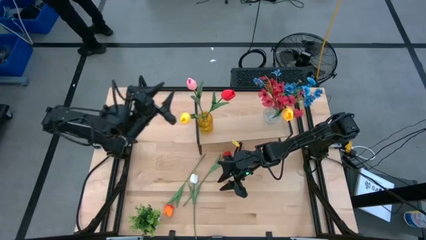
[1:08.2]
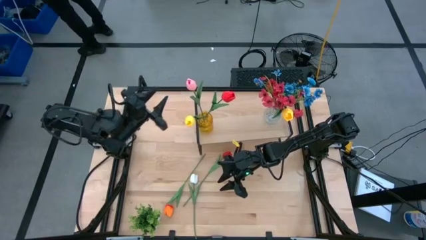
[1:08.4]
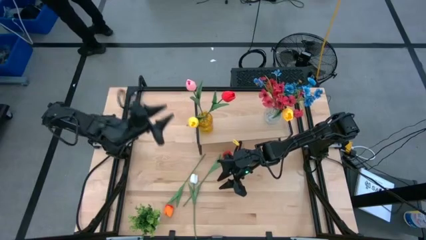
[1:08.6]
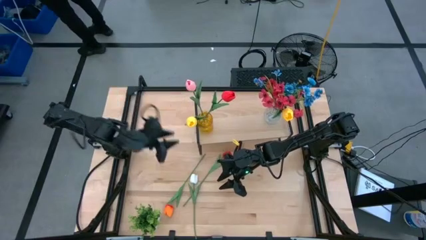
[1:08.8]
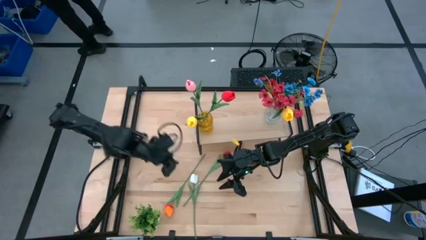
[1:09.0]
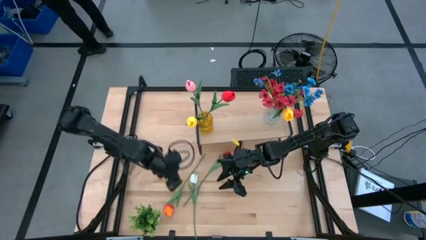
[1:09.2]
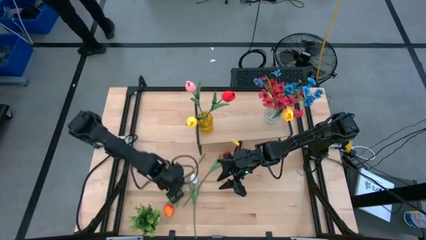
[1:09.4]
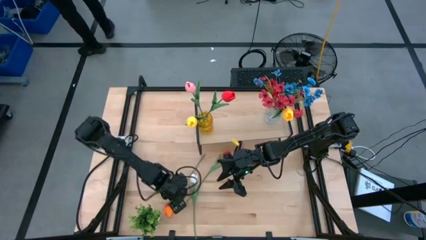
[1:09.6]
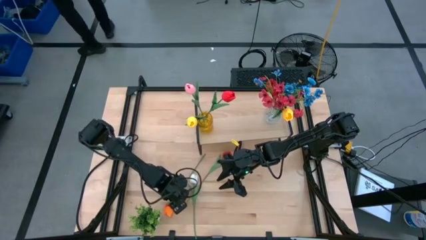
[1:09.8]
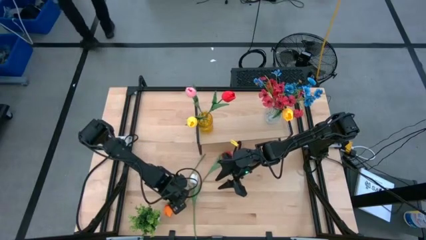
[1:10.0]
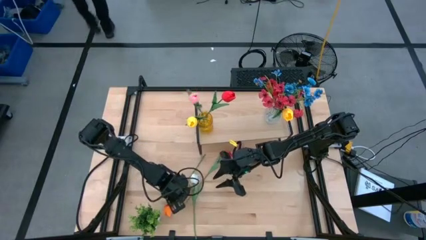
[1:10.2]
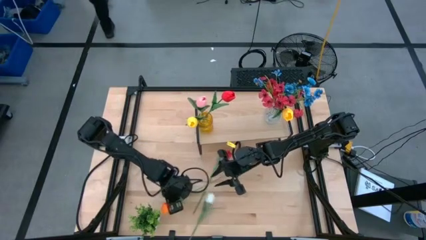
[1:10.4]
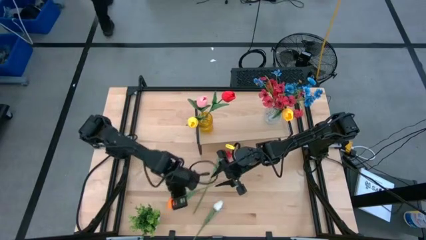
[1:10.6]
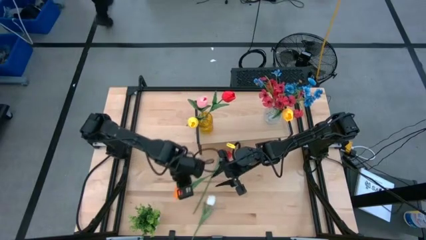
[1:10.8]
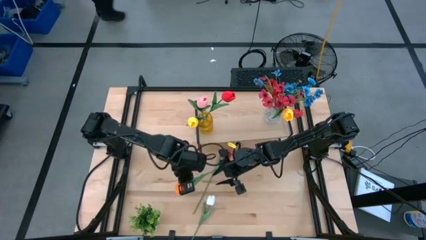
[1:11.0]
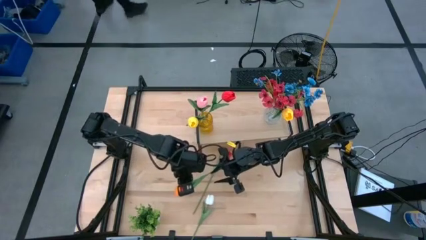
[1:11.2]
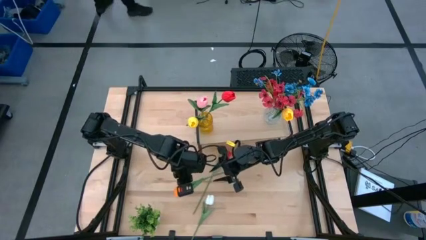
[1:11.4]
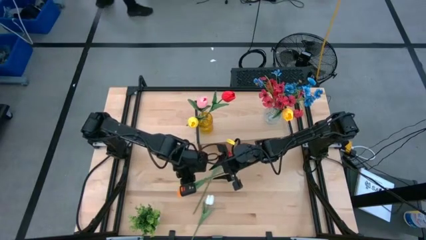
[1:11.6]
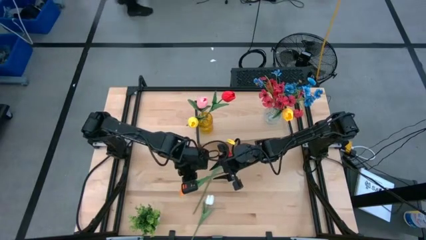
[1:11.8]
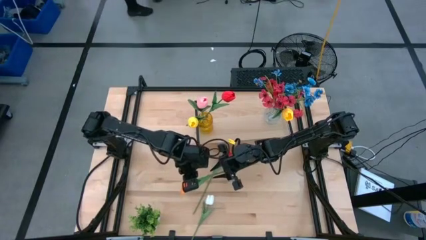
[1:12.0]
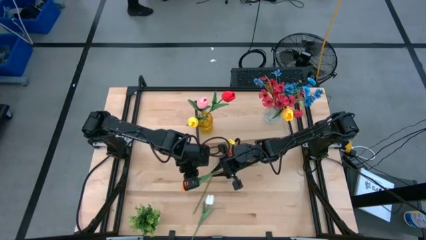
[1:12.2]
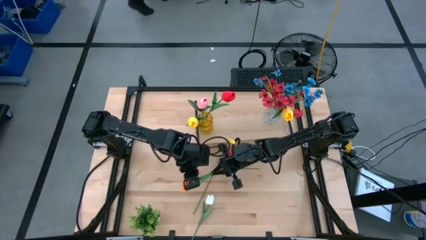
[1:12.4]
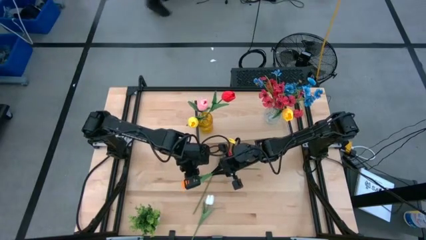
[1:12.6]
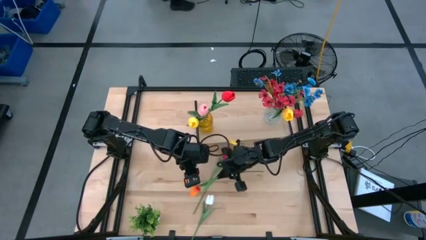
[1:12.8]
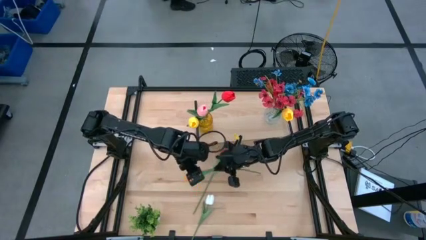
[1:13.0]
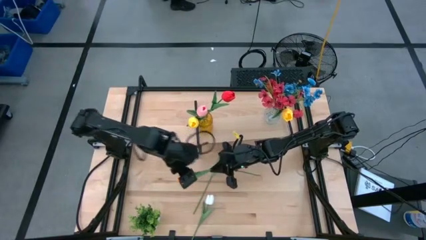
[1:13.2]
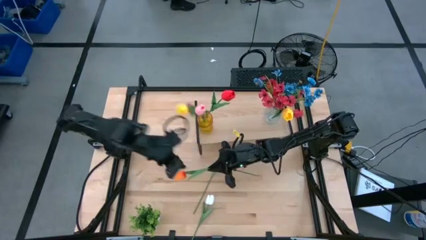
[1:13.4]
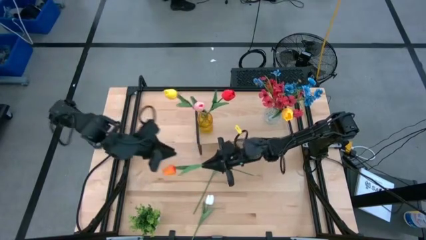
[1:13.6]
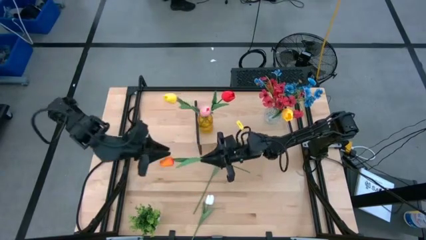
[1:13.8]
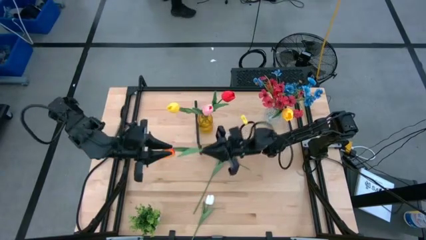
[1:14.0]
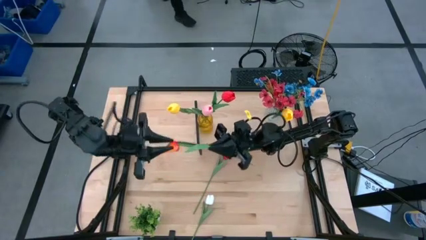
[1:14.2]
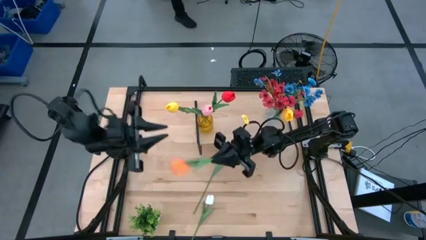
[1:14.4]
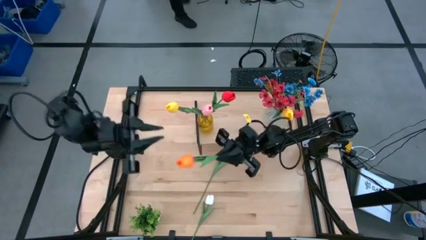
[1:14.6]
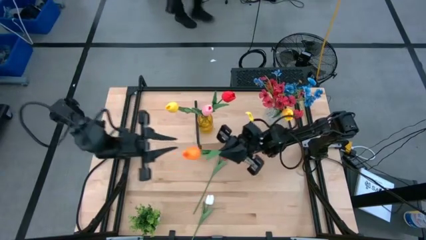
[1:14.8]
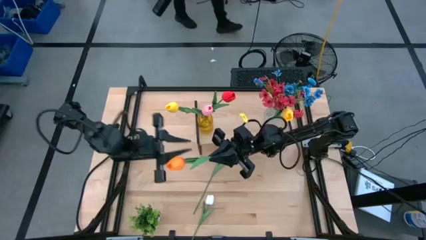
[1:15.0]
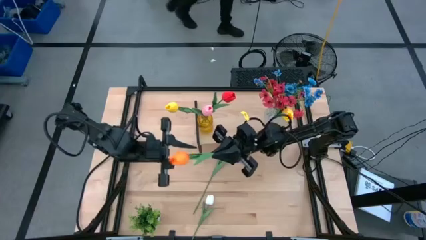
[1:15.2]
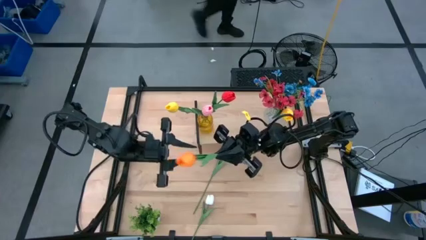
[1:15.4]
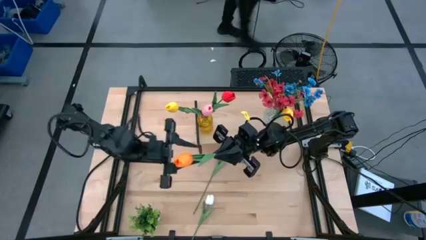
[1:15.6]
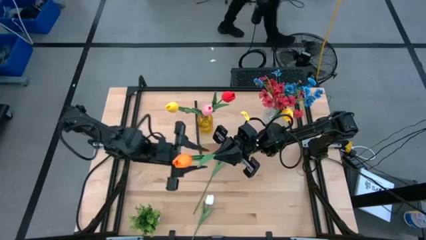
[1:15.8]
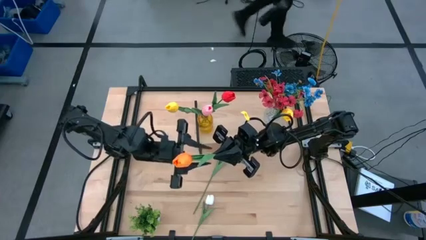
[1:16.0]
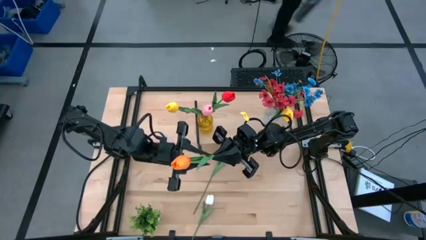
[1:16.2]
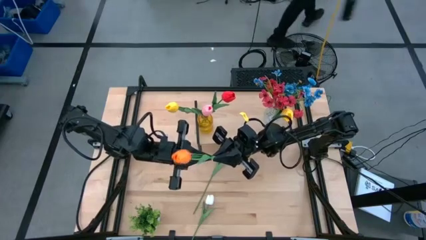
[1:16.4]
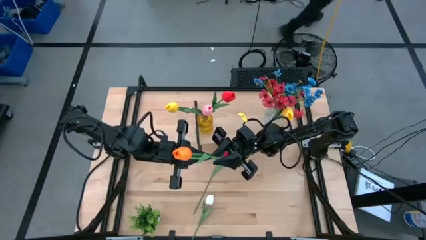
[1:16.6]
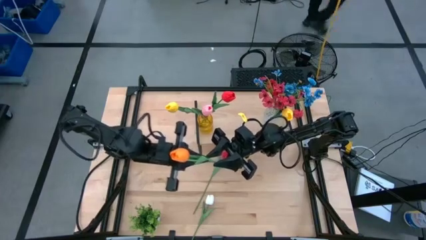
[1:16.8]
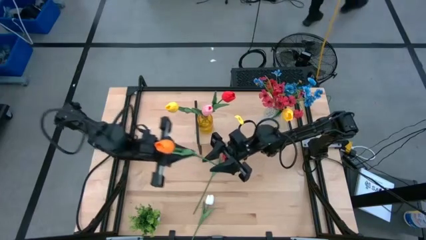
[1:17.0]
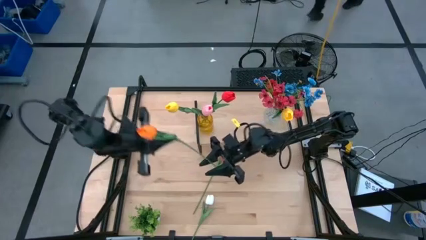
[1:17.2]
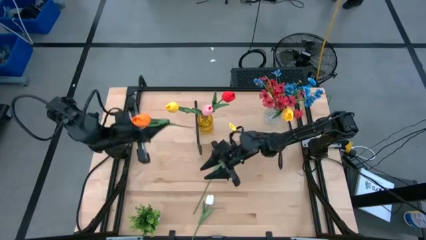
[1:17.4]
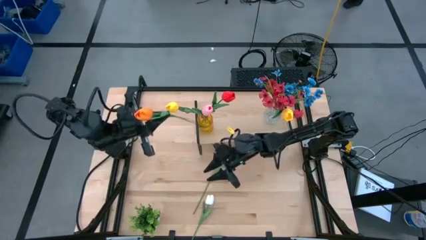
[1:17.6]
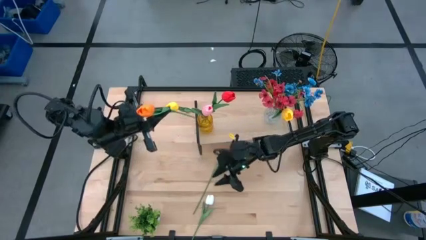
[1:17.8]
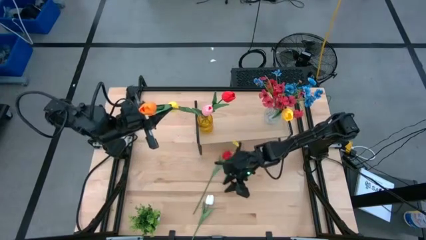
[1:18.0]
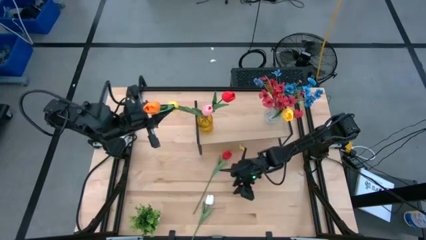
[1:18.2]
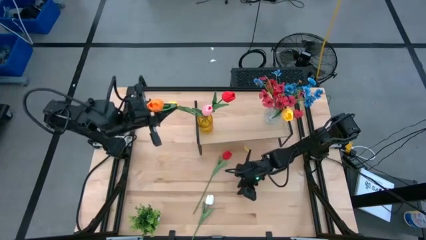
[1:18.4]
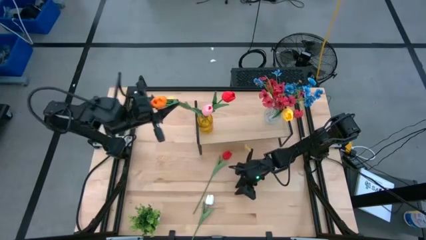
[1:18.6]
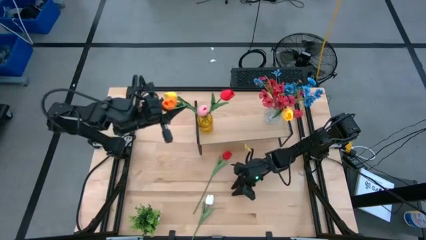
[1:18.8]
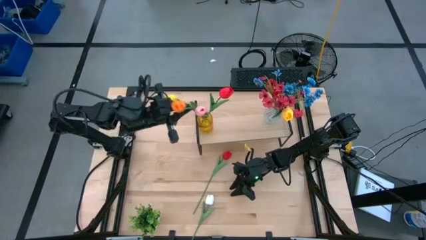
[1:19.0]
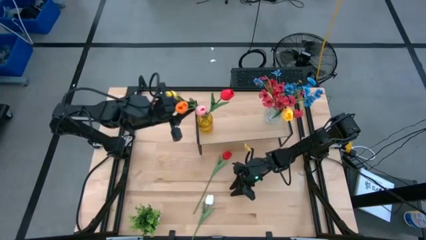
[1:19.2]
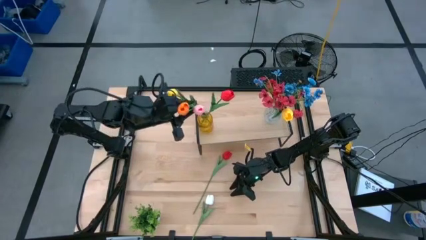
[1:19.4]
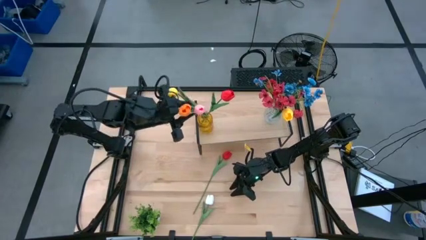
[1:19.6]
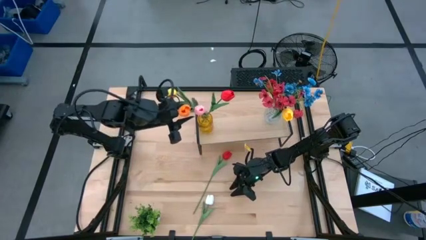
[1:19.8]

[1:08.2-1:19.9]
Task: Pick and place flowers into a vace then onto a shelf
Put the orange flower into the yellow vase
